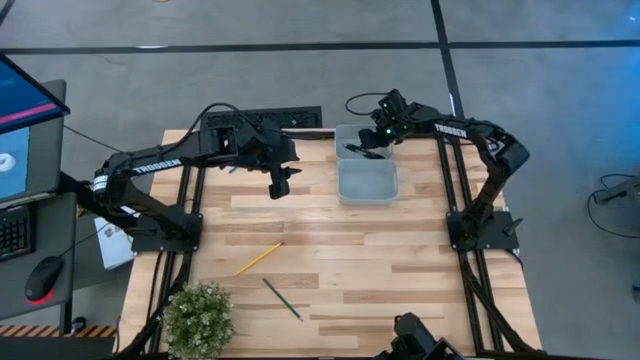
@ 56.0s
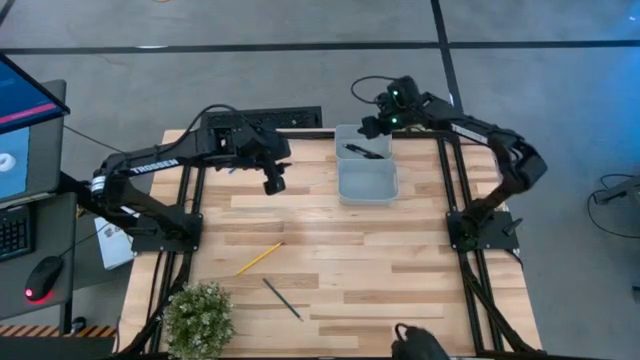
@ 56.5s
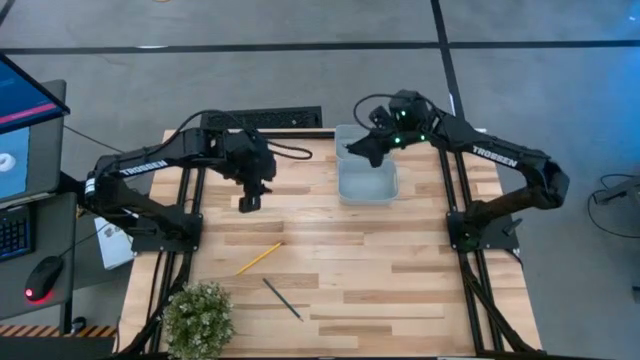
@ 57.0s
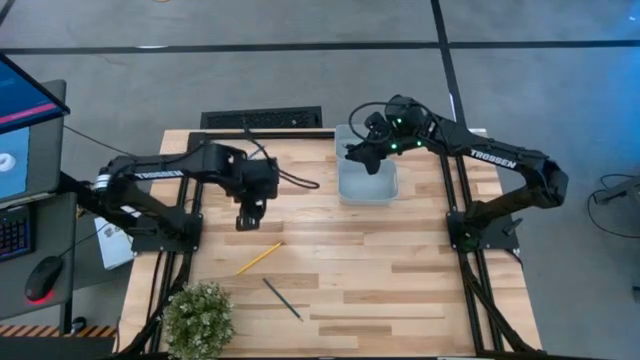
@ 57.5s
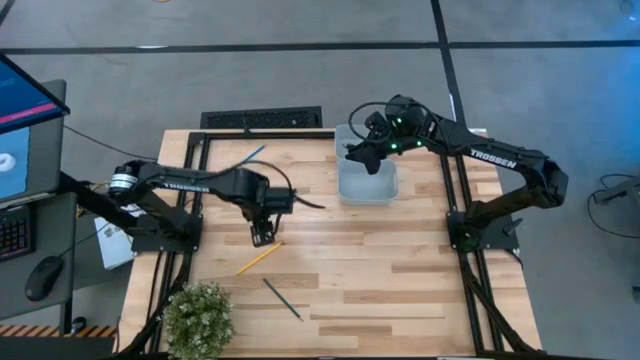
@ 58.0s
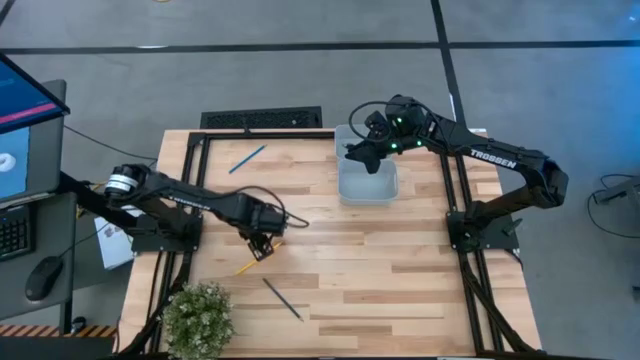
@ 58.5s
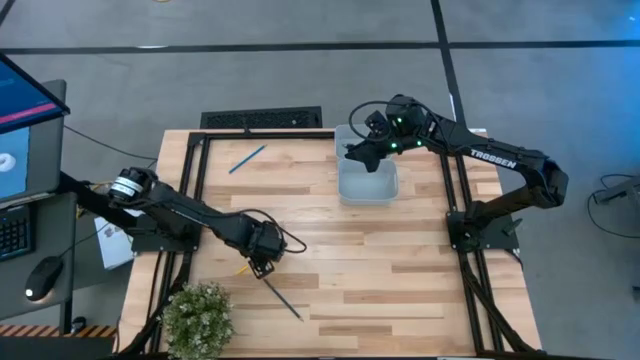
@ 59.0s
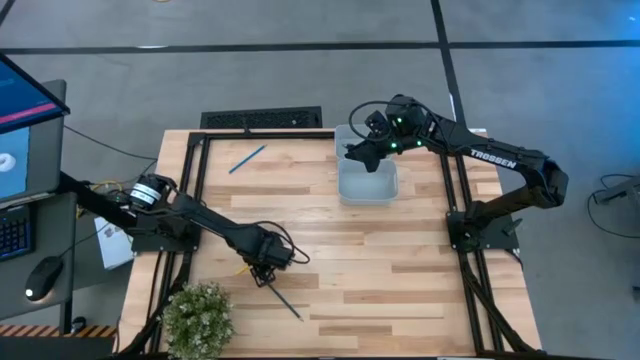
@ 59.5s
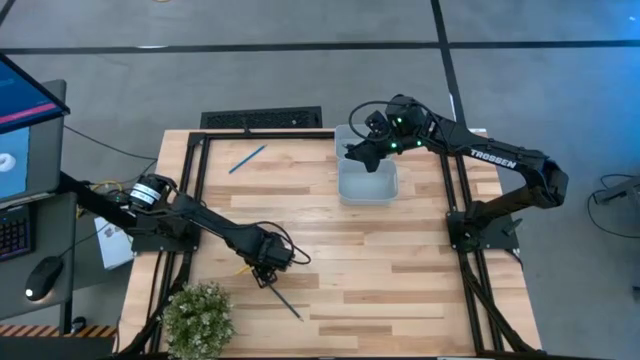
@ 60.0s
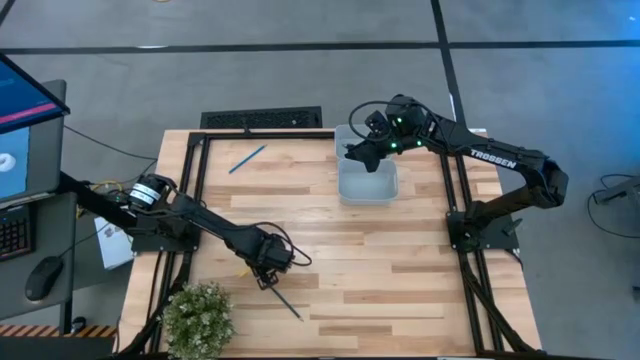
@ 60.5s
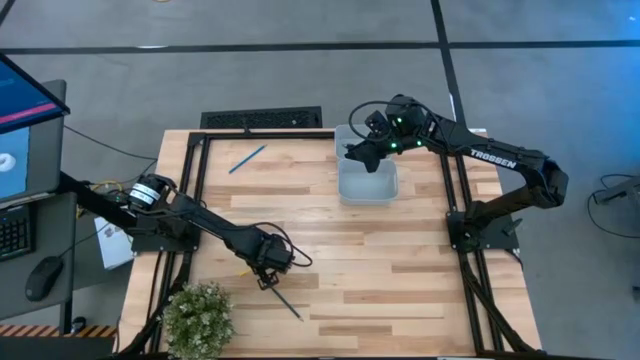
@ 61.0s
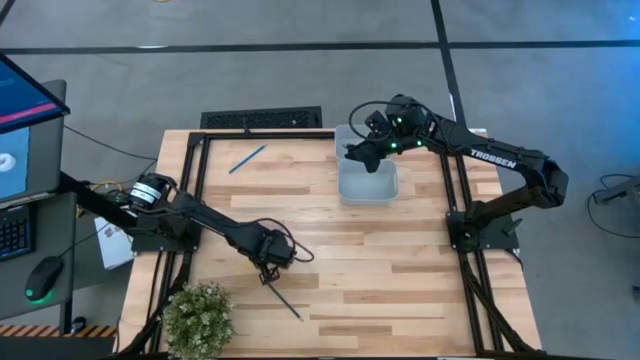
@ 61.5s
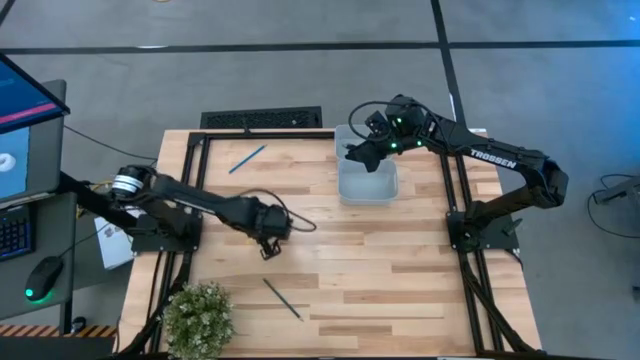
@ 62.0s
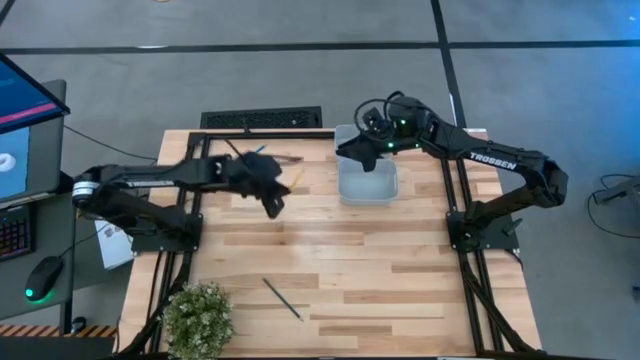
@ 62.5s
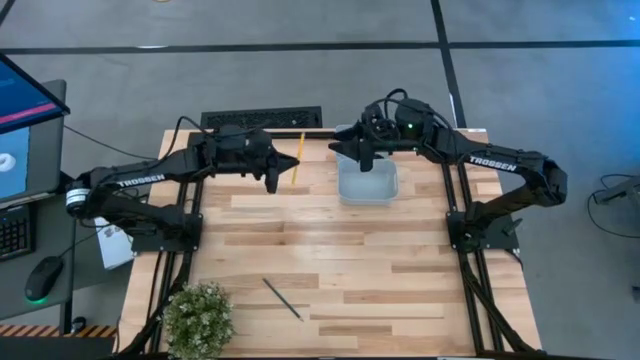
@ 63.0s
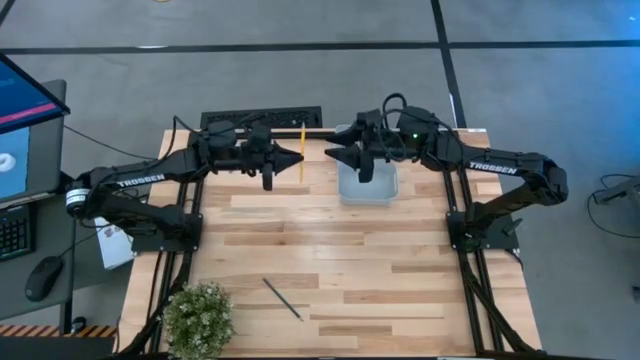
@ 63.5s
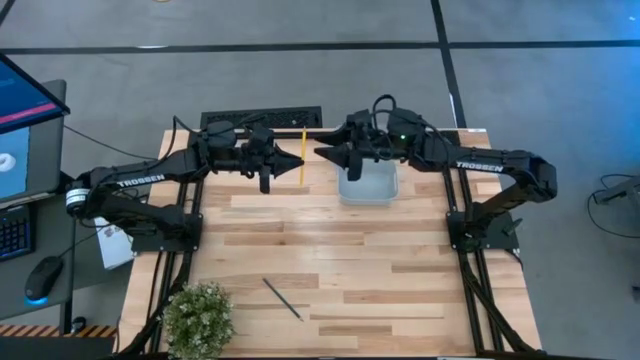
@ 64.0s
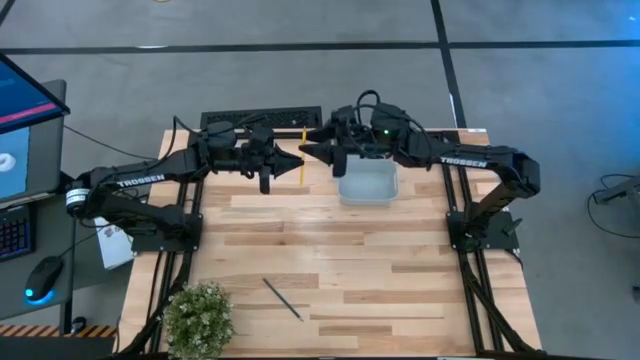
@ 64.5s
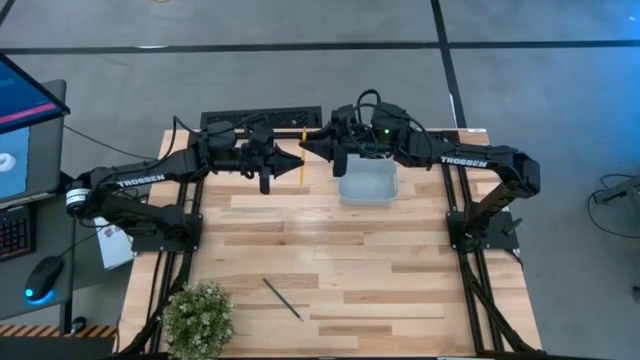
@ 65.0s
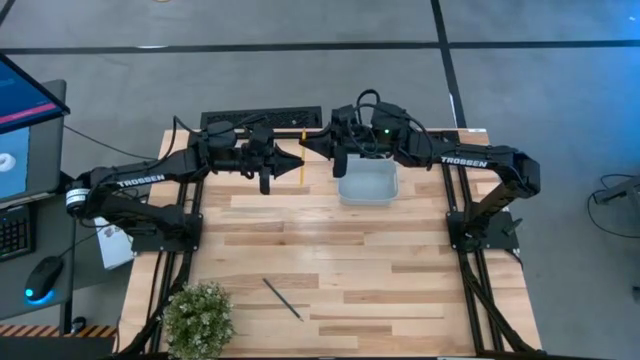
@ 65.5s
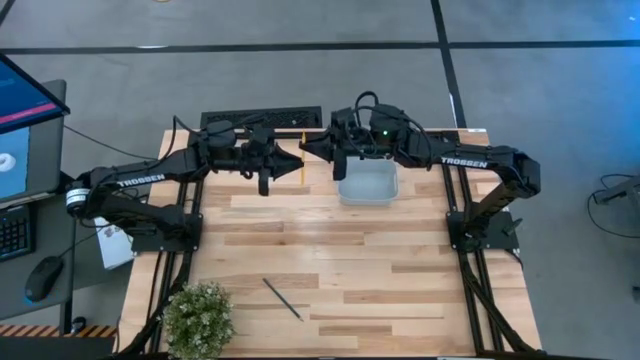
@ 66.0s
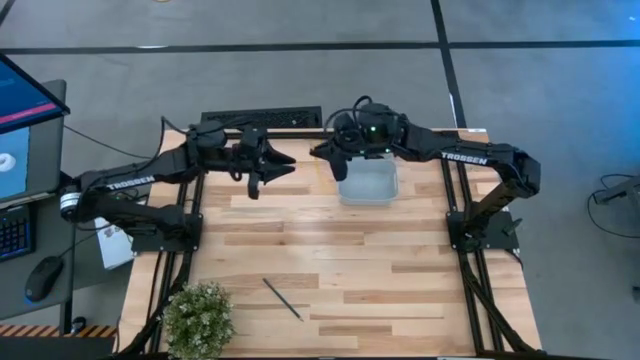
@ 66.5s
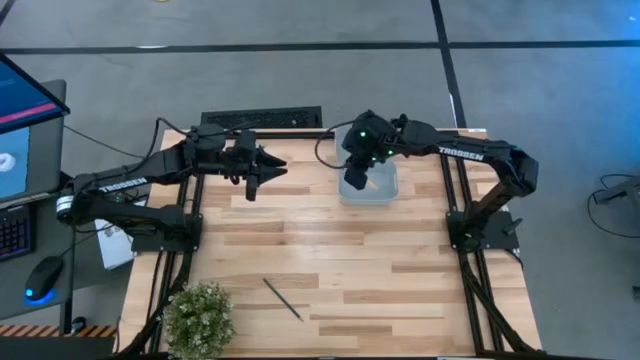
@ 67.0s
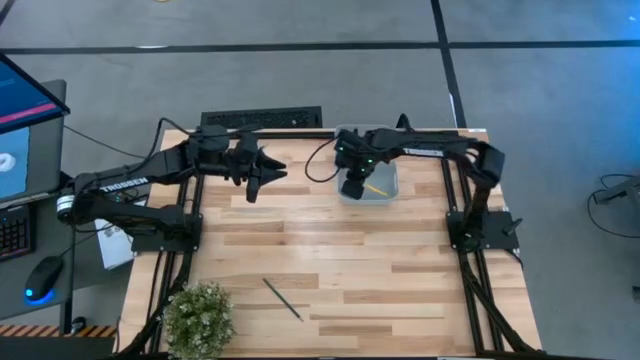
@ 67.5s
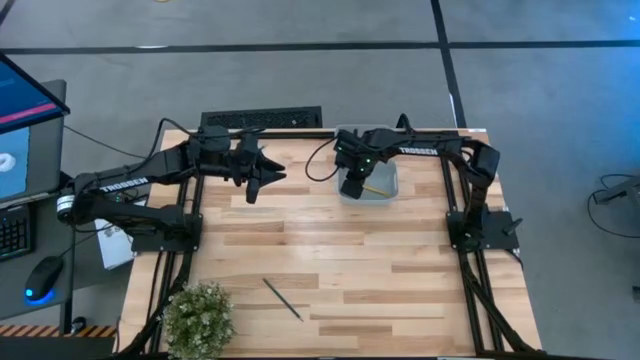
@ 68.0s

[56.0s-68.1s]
Task: Sort pens & pencils
Put the yellow pencil into the bottom bin

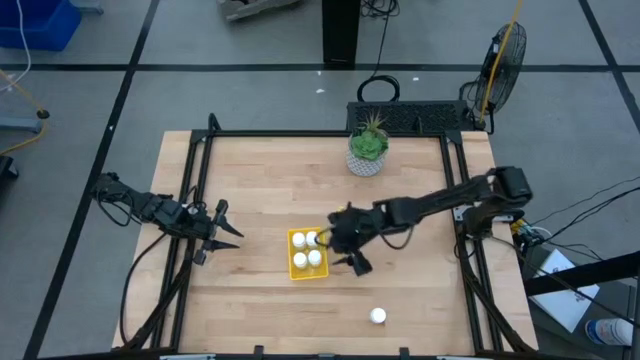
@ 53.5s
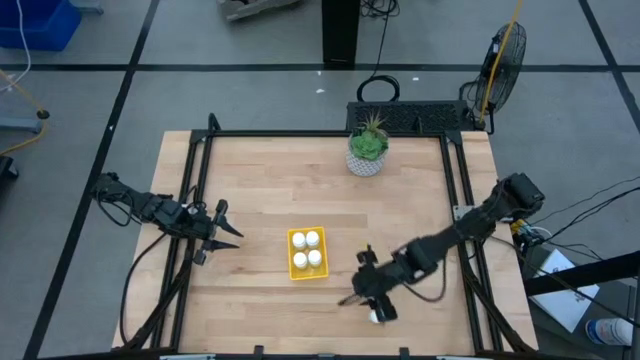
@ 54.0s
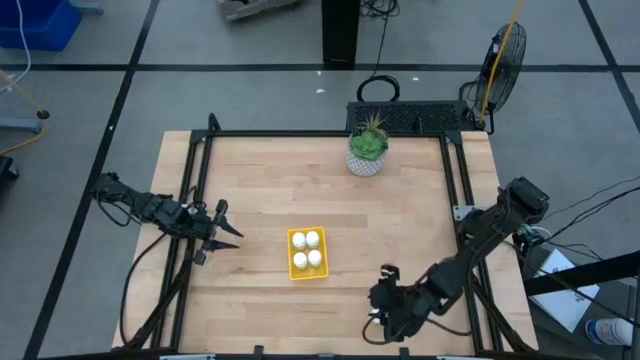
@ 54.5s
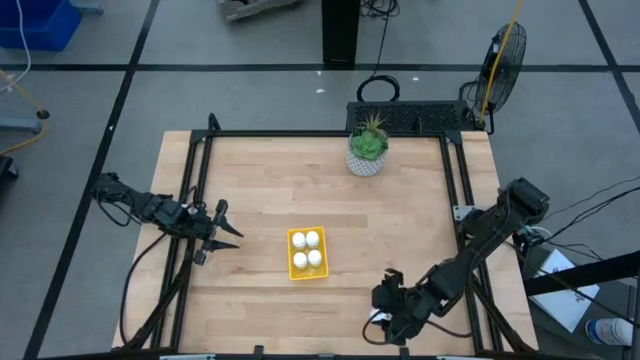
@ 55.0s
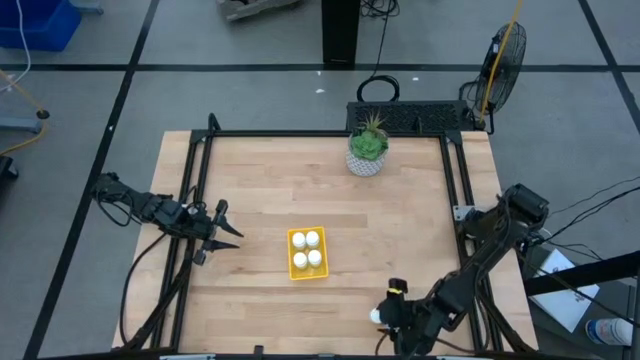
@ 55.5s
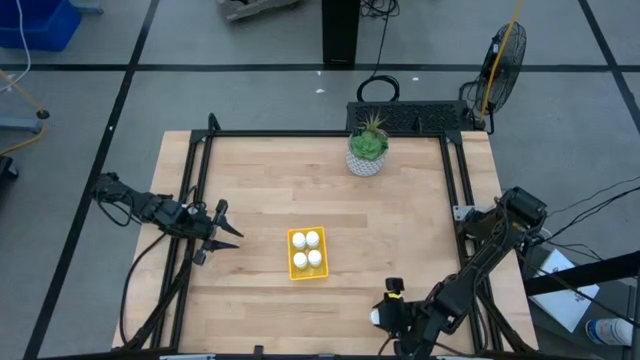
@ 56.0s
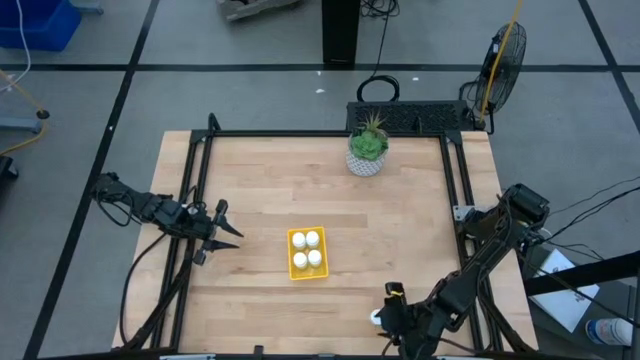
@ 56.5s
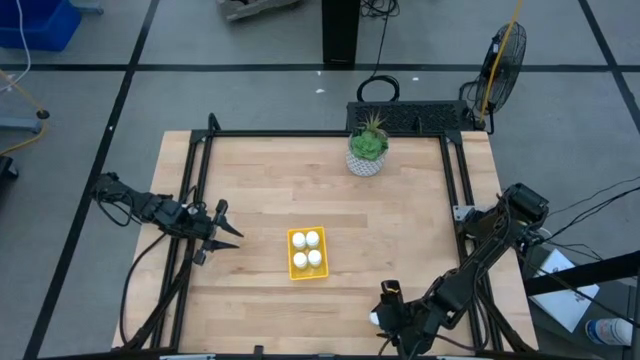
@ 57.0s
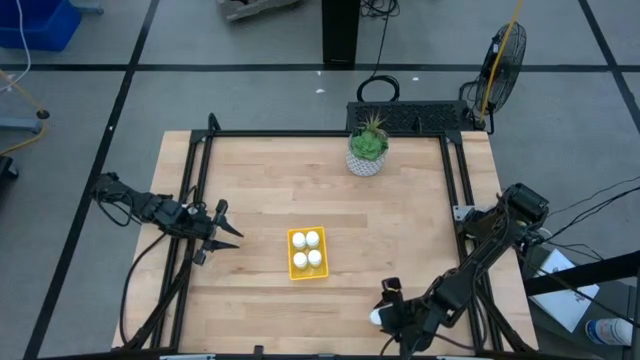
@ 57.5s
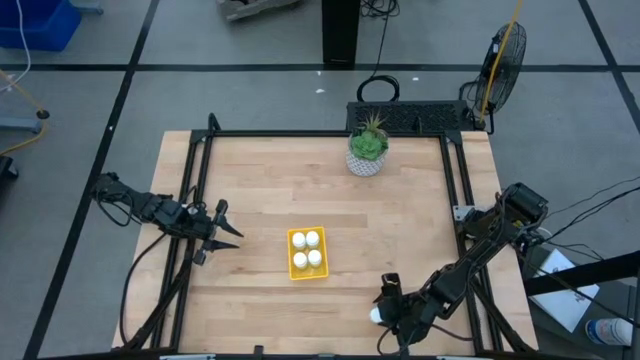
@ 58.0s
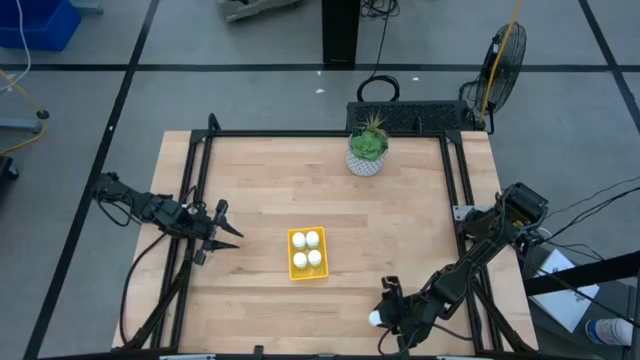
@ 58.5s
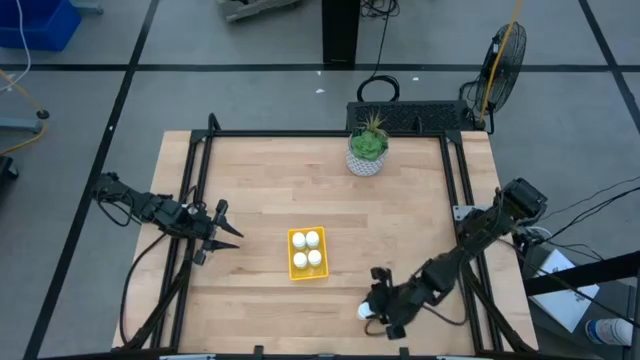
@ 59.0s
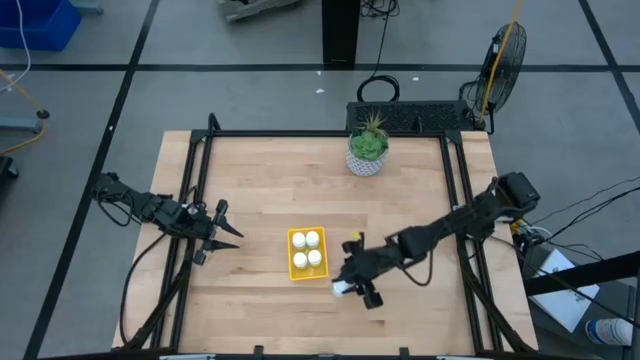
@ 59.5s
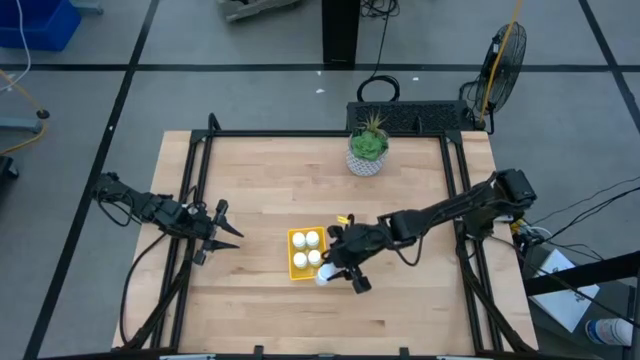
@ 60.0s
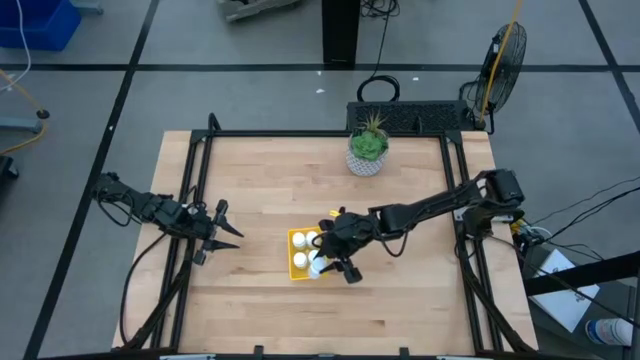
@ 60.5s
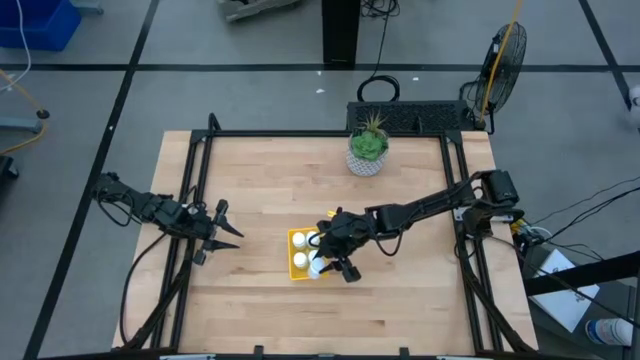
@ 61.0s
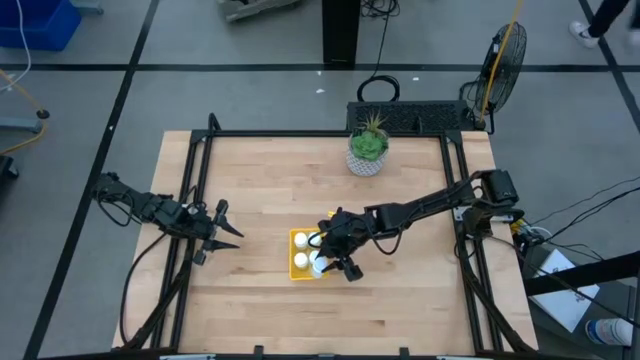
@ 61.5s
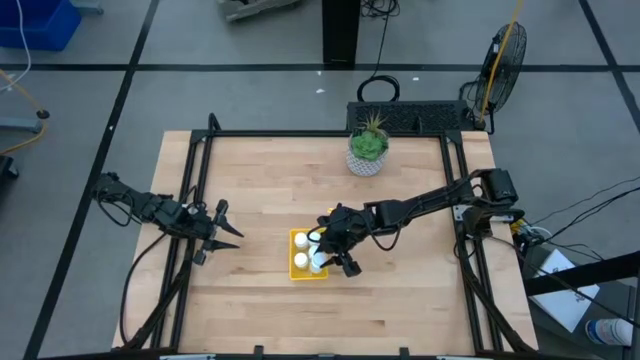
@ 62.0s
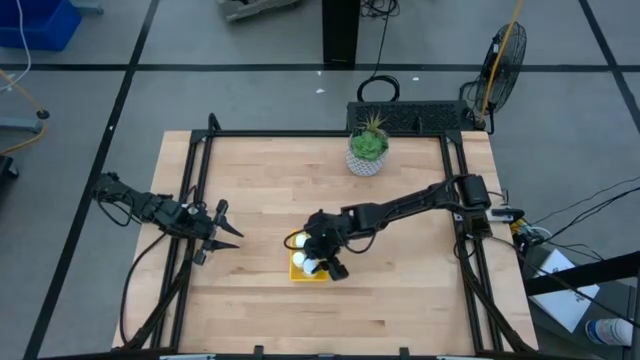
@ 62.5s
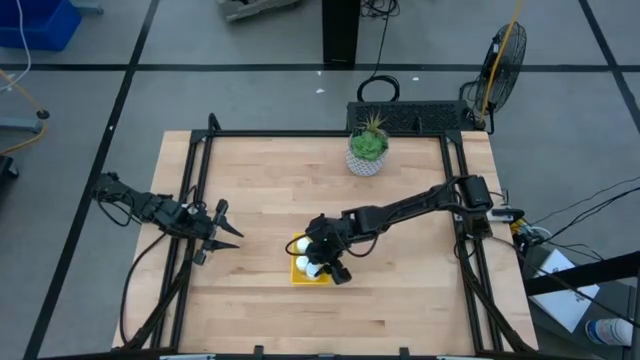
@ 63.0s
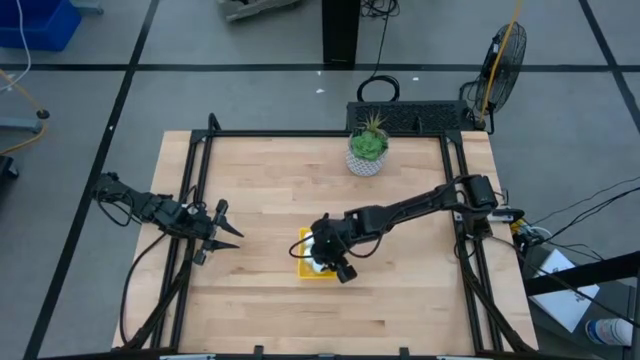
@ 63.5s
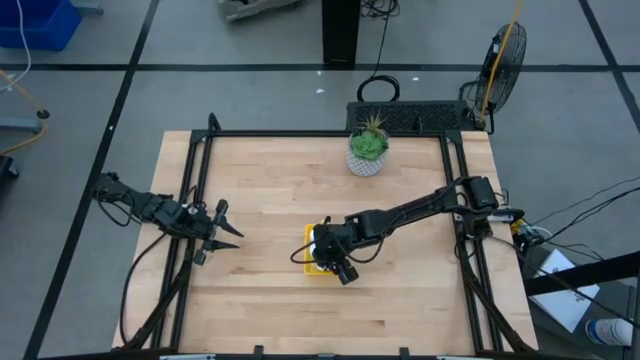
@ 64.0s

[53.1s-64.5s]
Task: Pick and place pill bottles into a basket
Put the white pill bottle into the yellow basket
